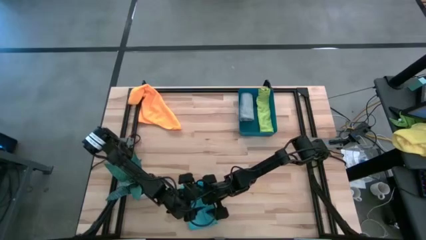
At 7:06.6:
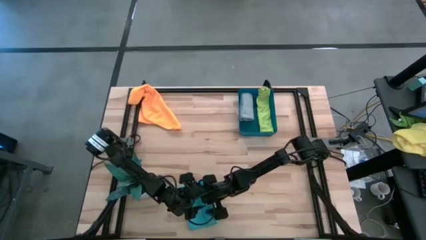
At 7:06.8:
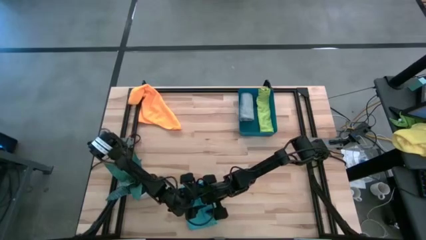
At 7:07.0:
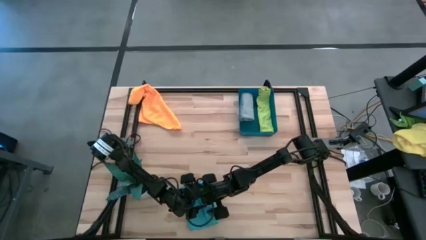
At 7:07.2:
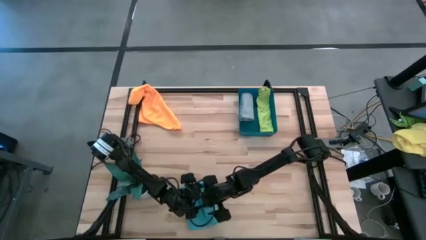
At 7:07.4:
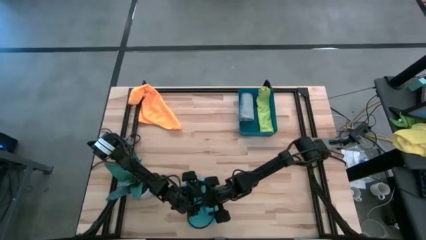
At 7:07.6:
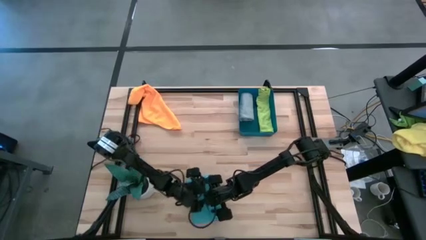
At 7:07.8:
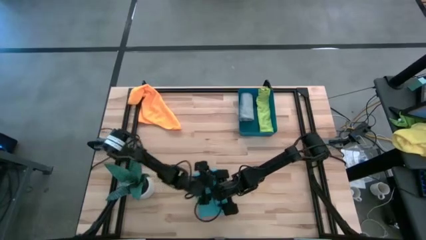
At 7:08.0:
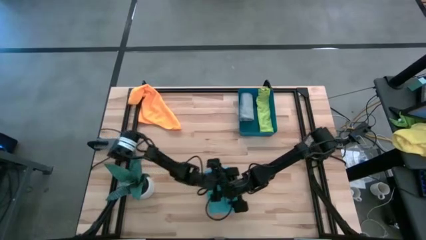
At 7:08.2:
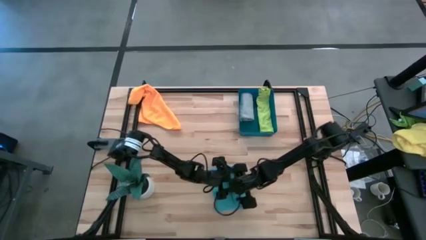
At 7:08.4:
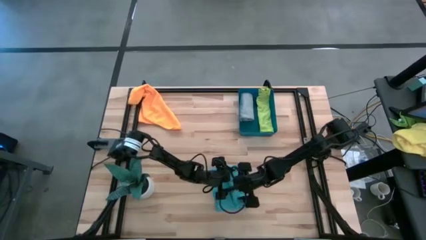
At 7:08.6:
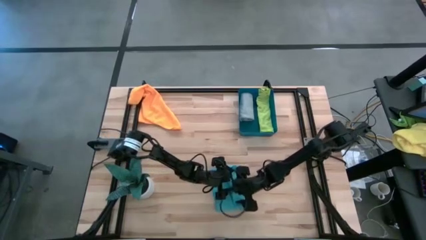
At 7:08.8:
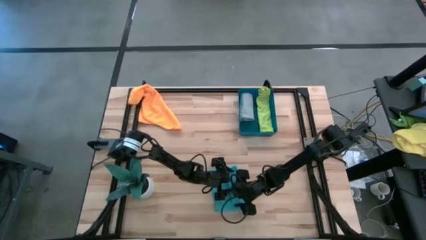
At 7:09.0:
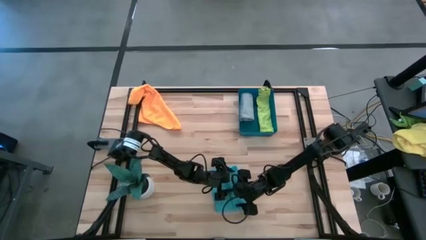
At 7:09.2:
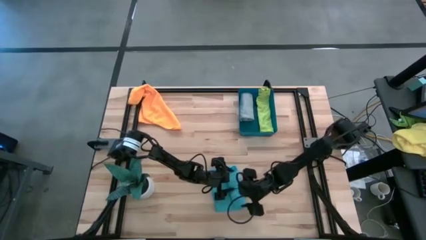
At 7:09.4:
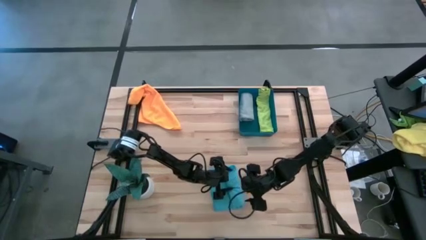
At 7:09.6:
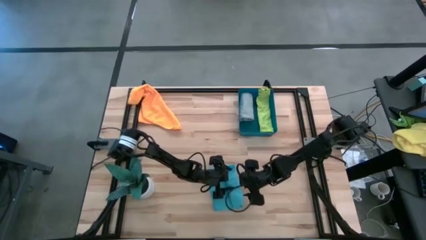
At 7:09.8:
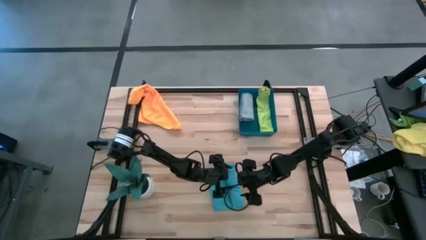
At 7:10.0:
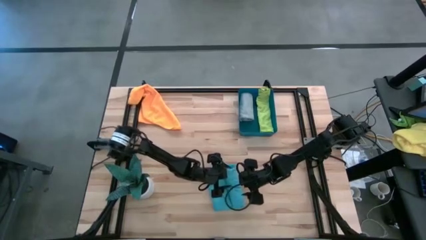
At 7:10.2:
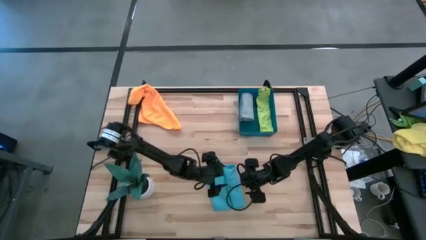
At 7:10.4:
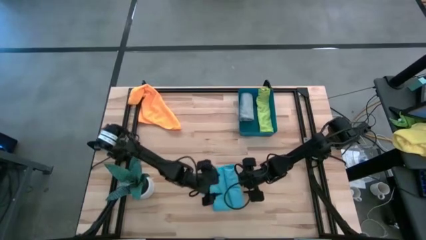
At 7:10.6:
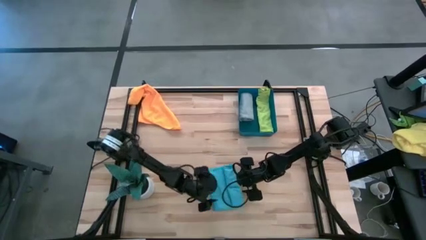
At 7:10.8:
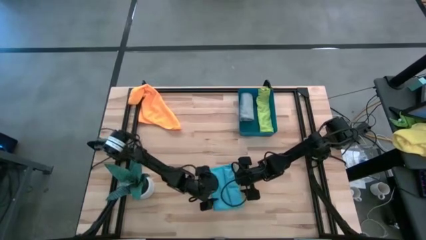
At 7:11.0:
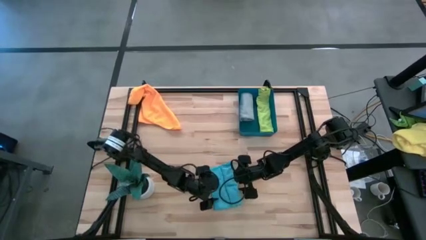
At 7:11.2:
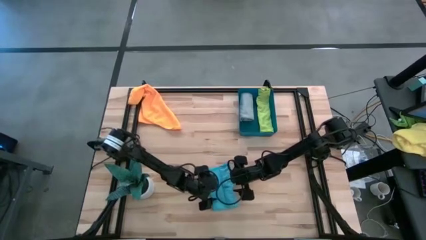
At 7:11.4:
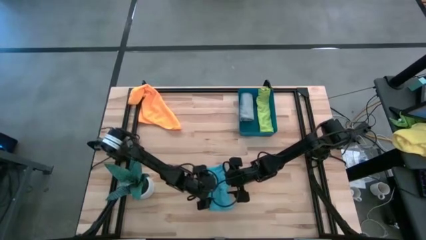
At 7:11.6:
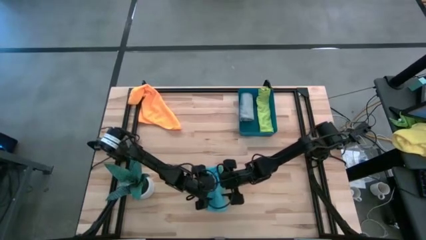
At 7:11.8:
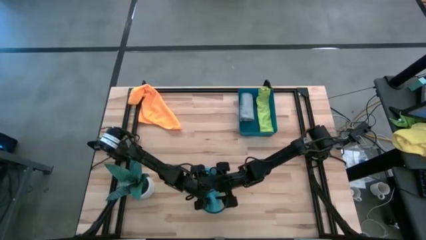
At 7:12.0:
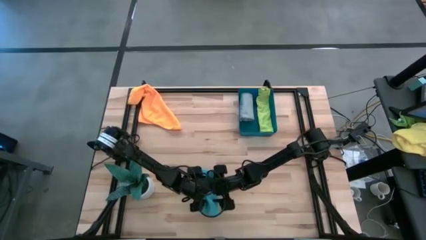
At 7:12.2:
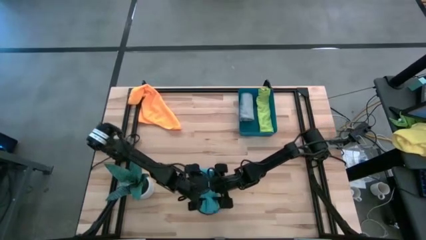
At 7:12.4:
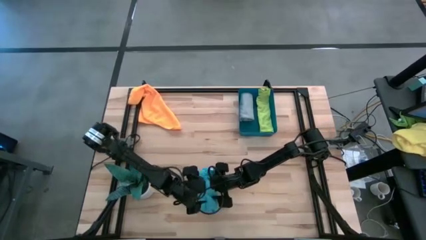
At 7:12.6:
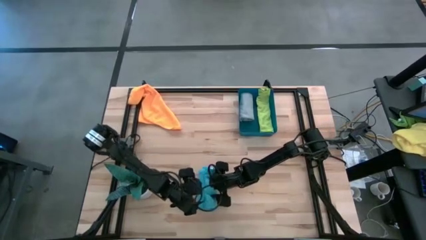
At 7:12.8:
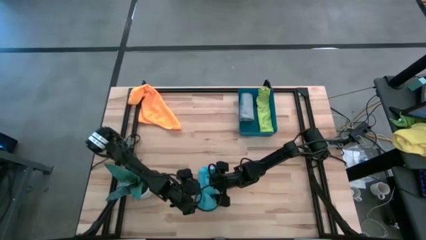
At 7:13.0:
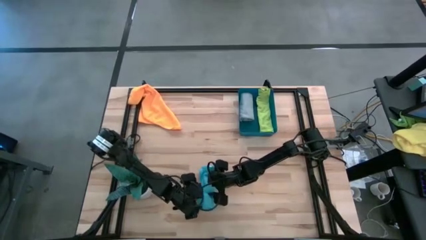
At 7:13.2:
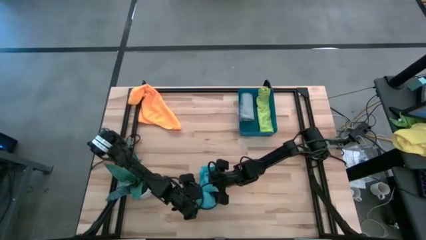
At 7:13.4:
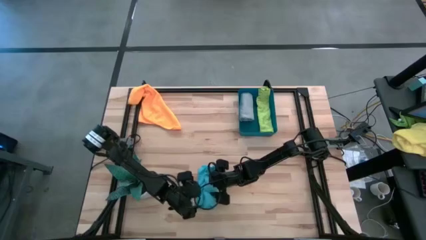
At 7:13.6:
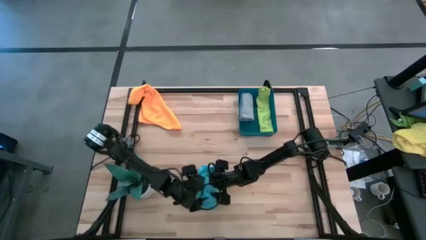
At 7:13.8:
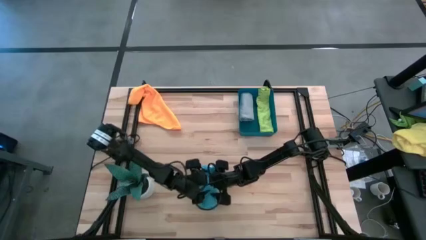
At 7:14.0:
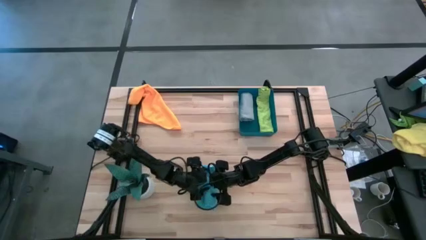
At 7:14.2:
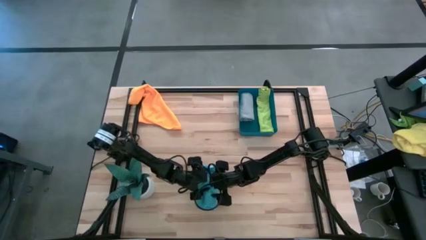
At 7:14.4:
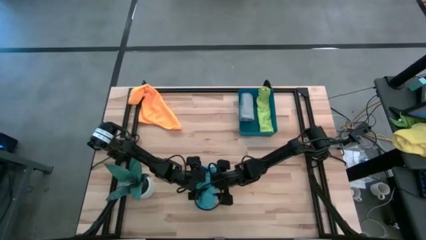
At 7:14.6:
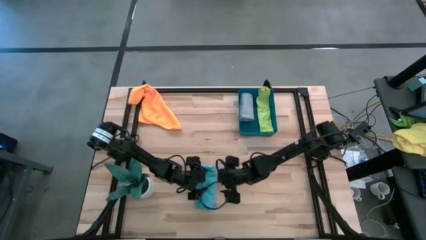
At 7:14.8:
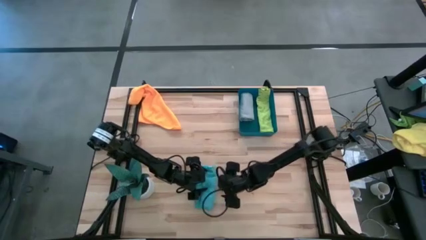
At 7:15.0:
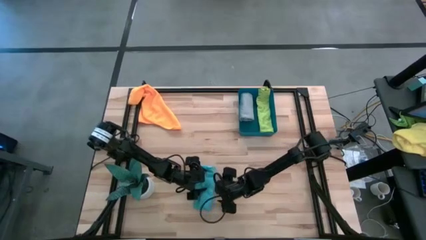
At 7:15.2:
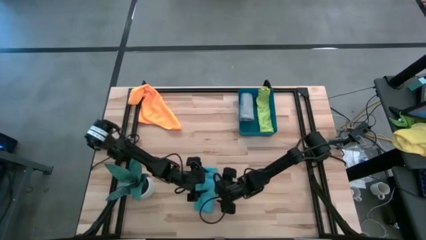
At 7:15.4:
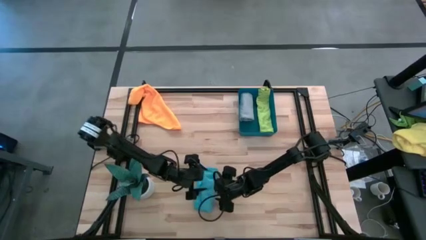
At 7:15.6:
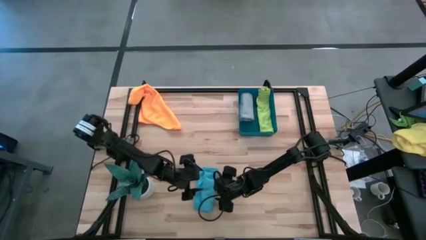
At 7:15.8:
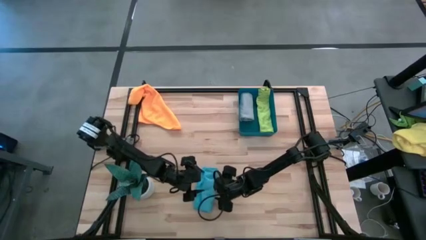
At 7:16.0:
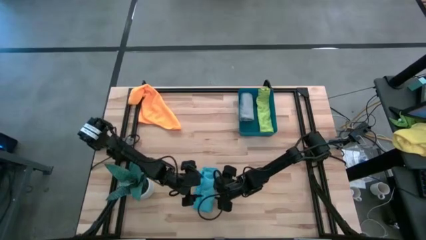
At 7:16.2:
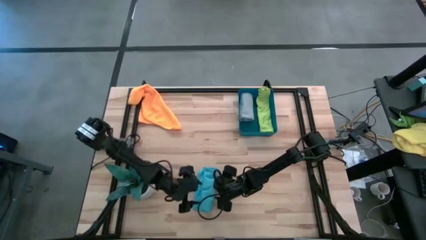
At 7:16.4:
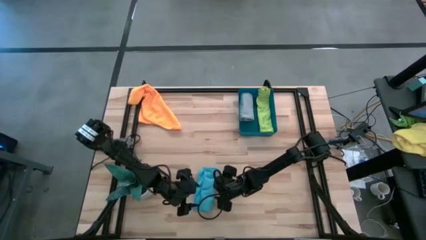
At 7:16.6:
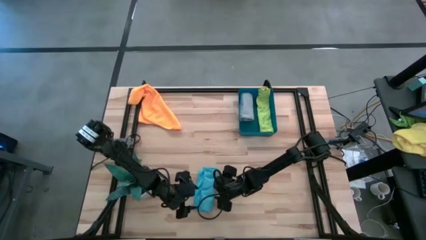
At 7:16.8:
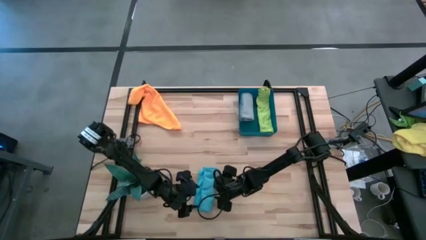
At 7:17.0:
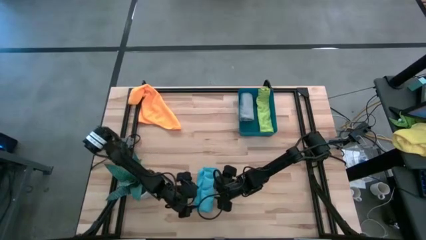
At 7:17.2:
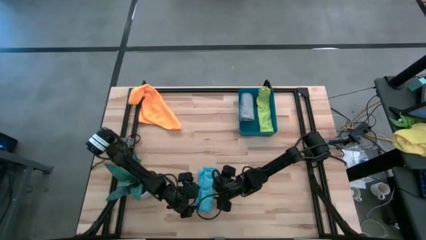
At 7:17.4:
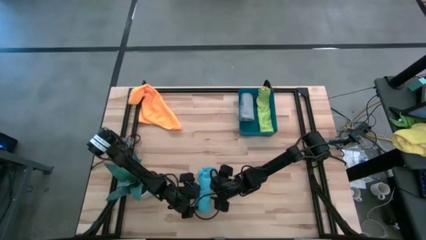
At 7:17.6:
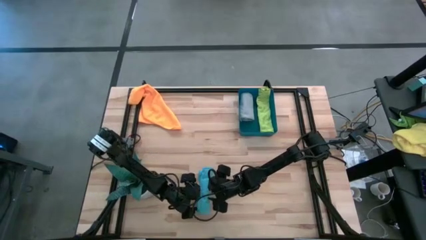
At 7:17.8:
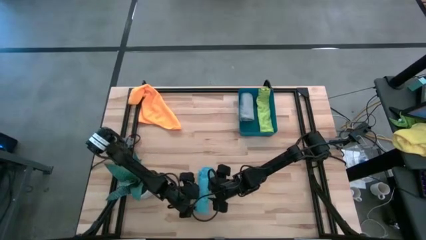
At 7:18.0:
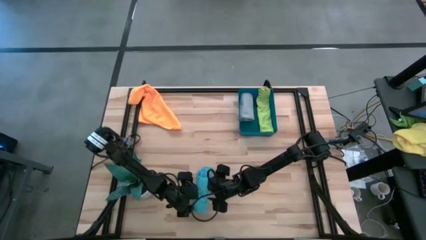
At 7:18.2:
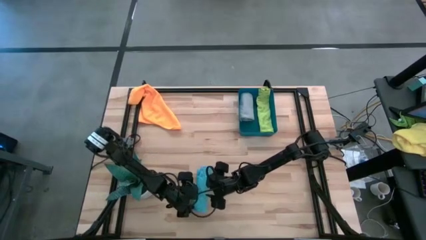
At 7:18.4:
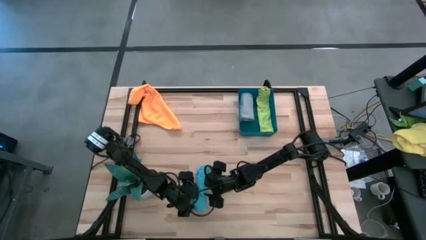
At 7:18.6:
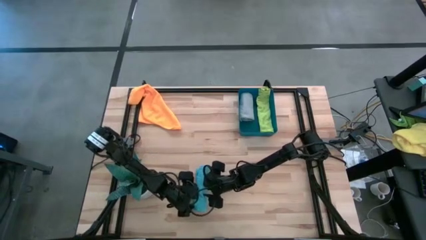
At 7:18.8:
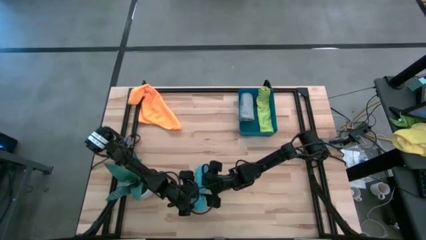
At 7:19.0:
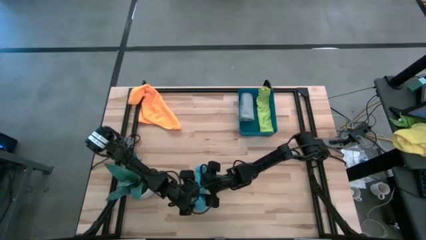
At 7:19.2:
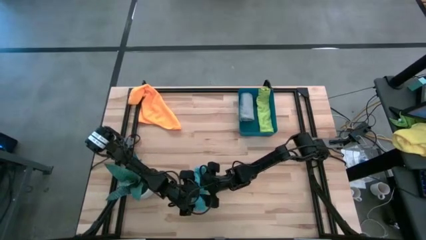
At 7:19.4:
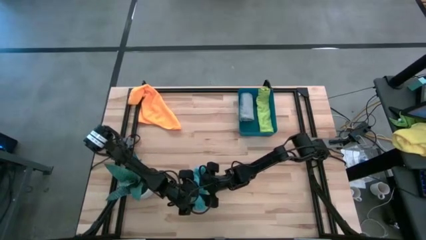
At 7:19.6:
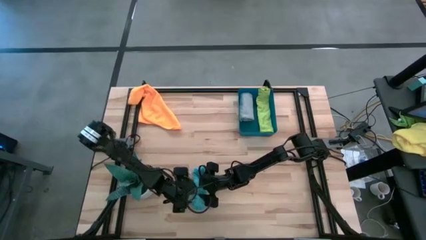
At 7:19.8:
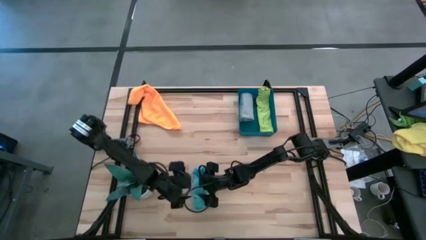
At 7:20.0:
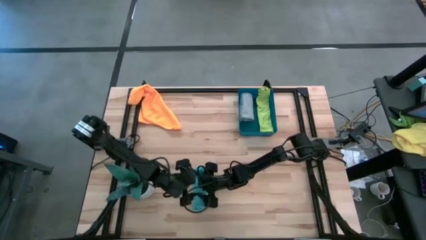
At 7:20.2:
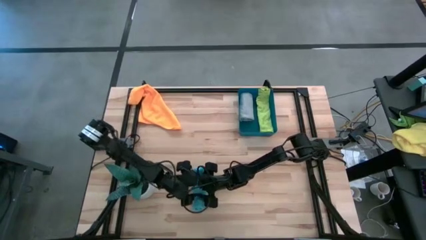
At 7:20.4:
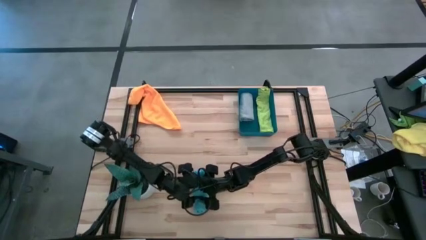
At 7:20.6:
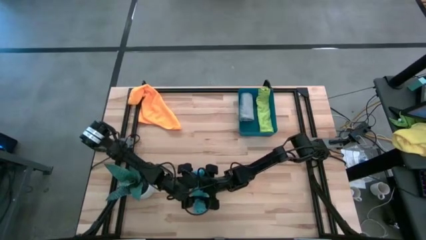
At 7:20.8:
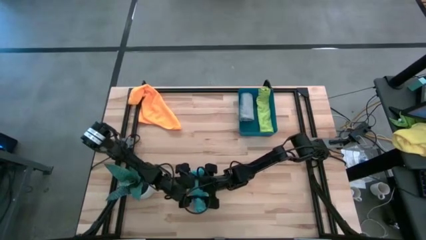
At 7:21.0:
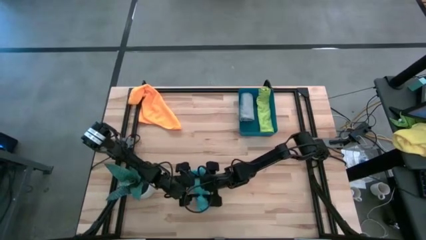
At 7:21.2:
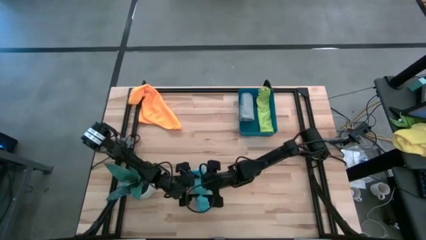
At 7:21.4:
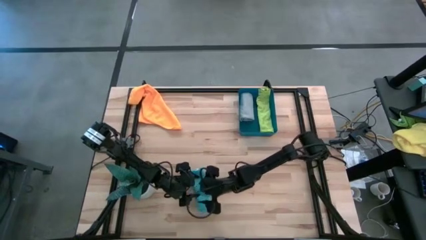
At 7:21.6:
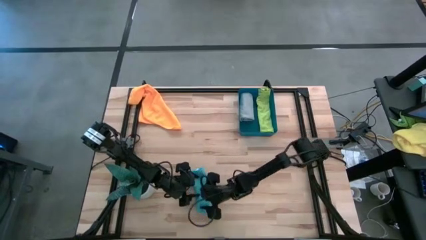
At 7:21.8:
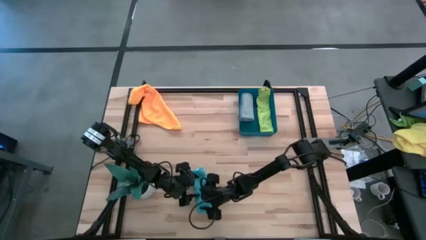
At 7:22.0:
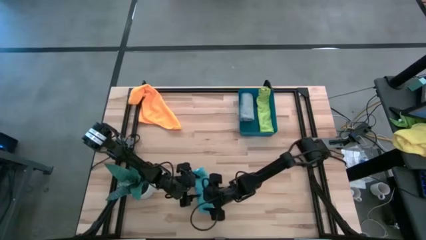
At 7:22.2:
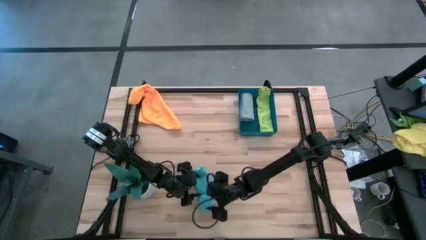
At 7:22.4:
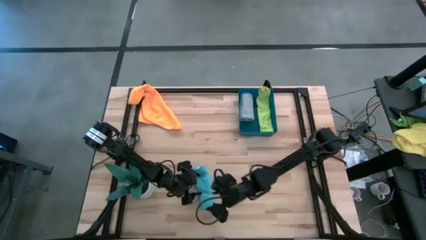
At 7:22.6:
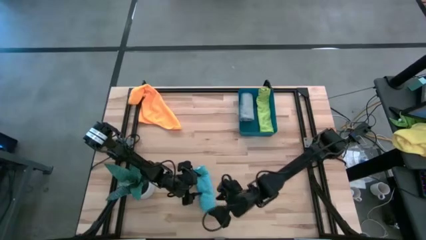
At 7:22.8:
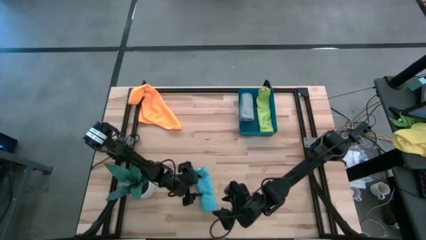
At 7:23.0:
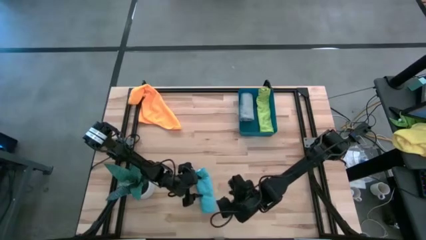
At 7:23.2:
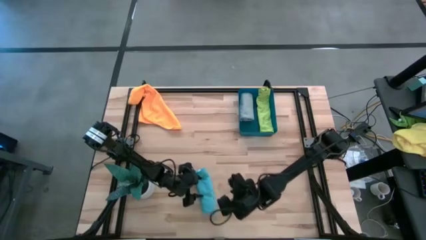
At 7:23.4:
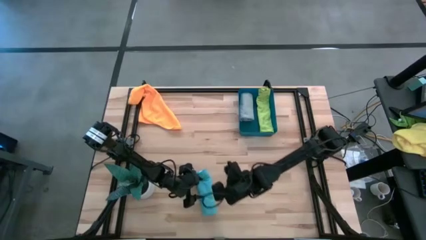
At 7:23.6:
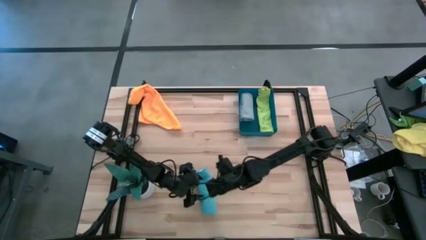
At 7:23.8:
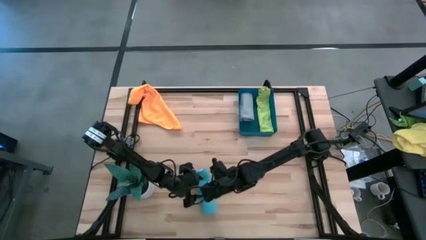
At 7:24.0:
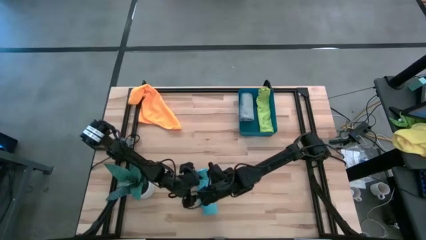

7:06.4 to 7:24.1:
Task: Roll microfiber towels into tight, uniform cylinder then place into a basket
Roll the blue towel
